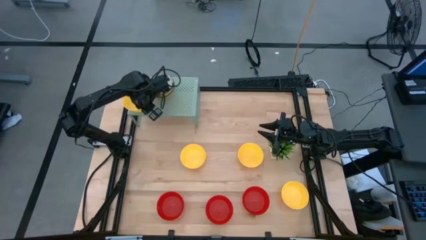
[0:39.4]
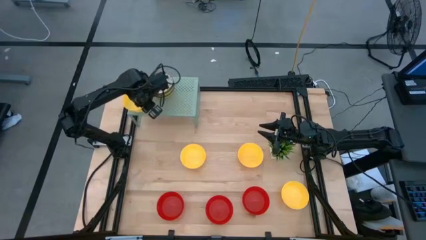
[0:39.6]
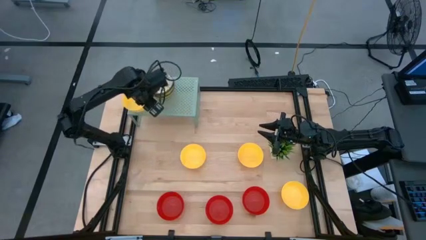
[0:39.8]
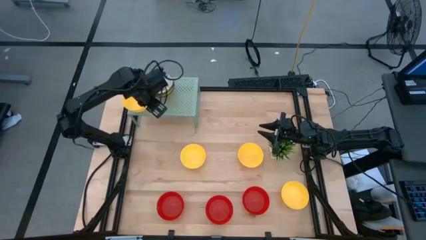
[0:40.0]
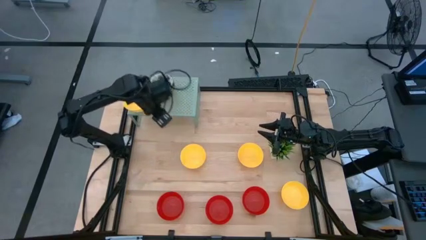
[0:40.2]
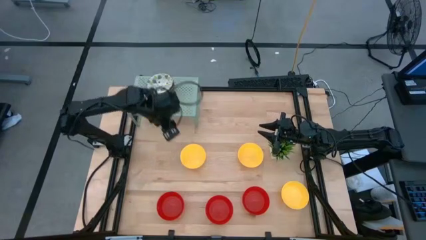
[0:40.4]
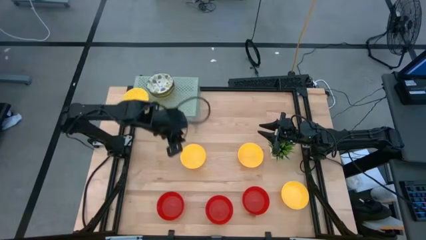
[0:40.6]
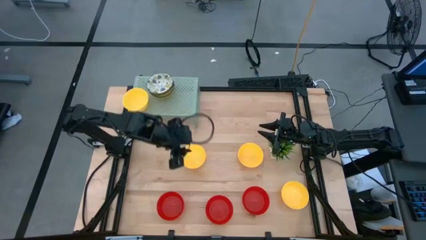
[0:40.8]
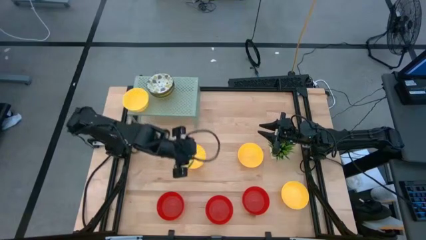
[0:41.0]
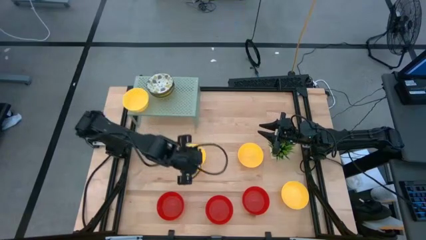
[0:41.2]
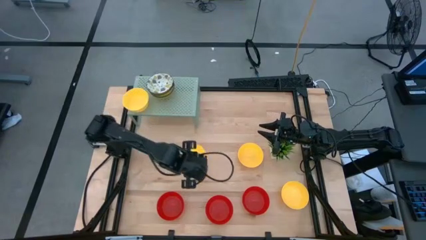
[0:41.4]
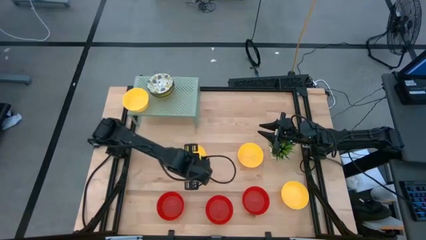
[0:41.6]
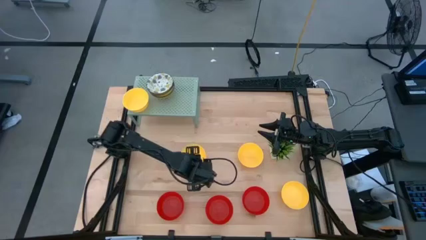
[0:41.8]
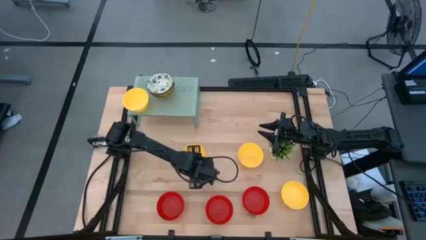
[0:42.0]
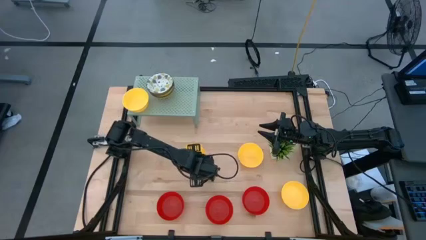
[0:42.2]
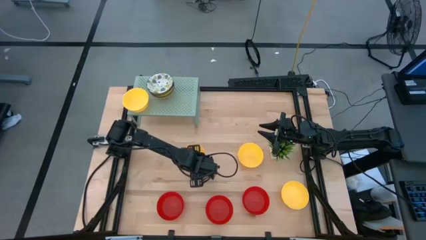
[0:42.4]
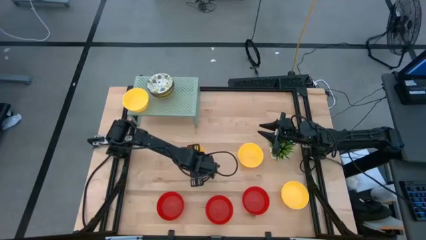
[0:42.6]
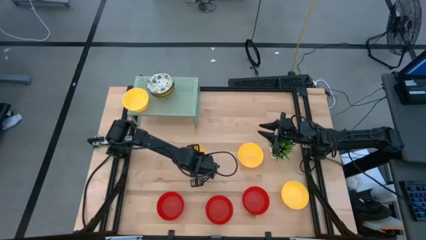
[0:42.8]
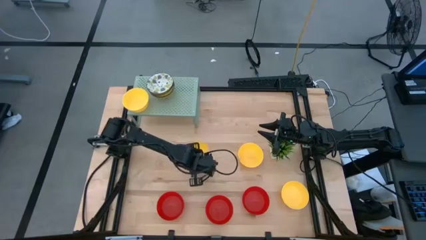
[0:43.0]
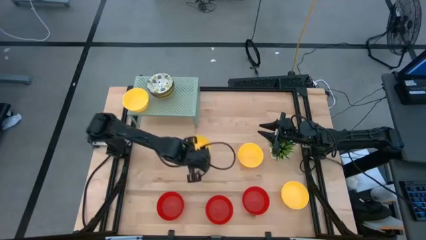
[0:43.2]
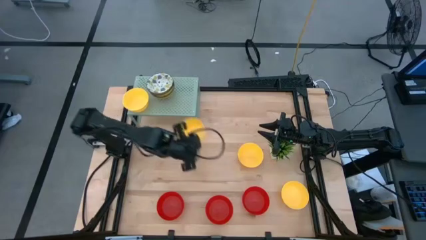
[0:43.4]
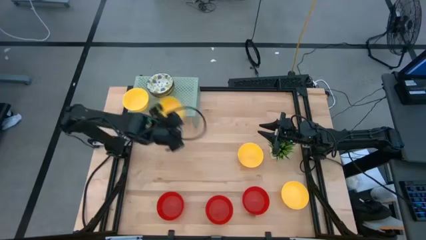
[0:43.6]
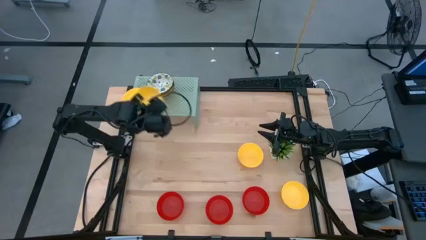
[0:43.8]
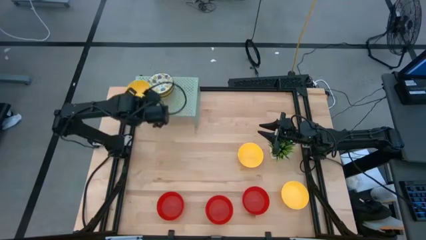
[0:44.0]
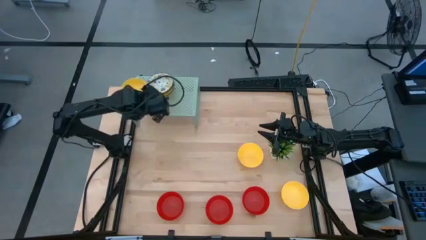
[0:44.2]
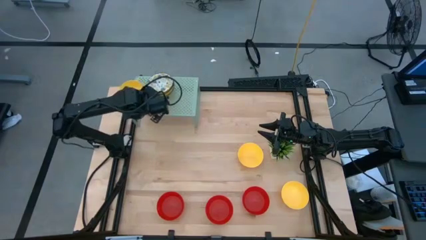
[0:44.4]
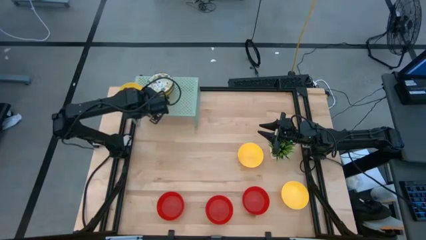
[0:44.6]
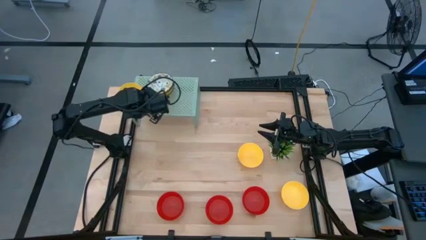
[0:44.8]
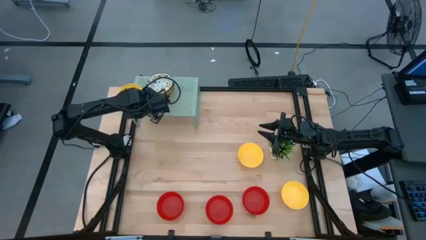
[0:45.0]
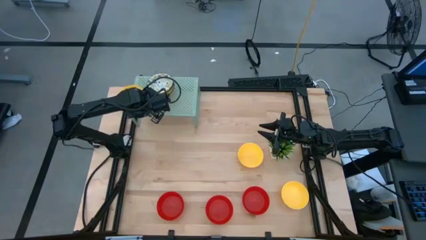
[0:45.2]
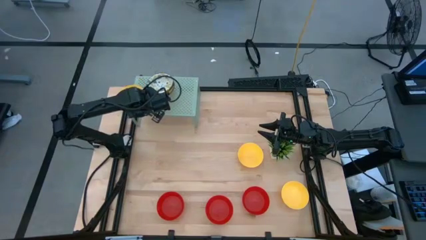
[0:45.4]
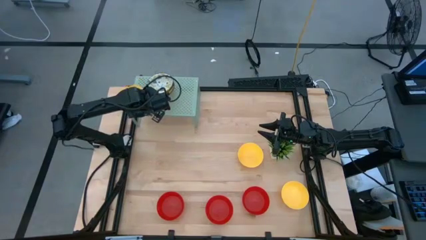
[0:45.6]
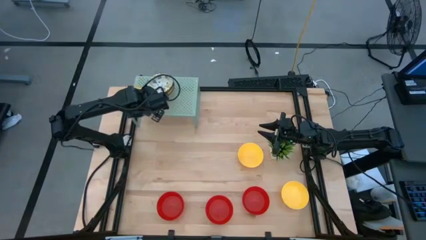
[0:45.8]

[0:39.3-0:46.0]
Task: Pick & Place Mini bowls
Stack the yellow bowl on the yellow bowl on the shelf

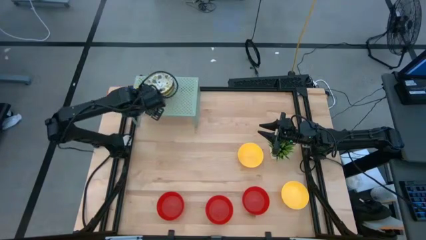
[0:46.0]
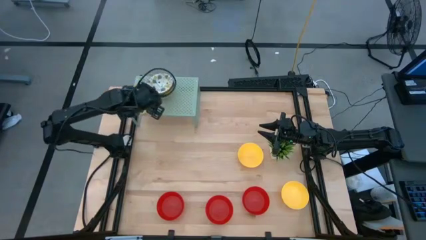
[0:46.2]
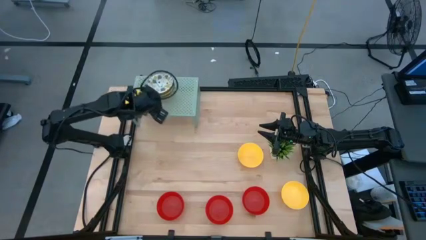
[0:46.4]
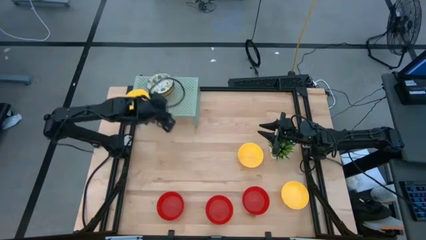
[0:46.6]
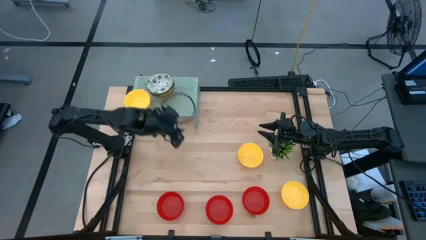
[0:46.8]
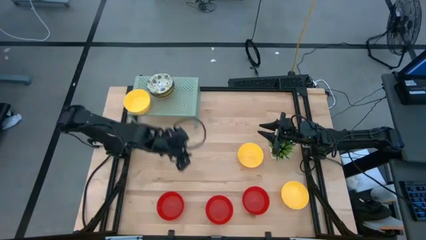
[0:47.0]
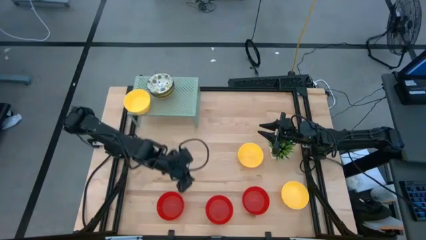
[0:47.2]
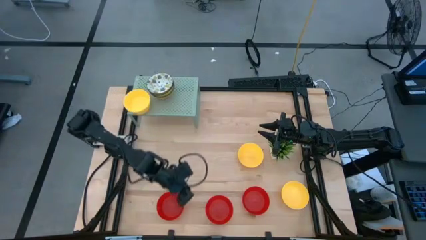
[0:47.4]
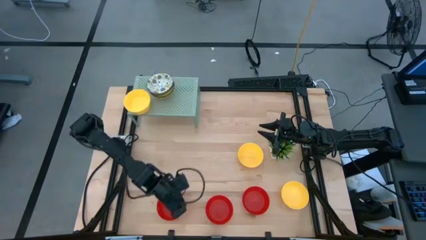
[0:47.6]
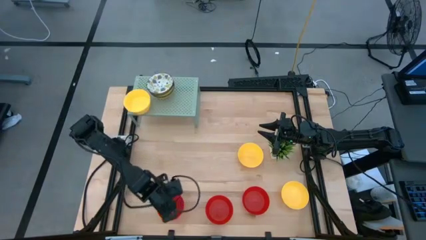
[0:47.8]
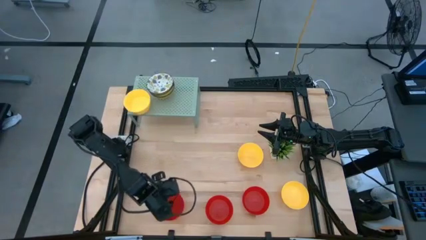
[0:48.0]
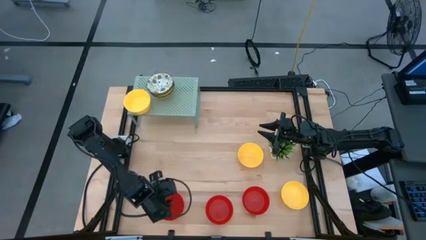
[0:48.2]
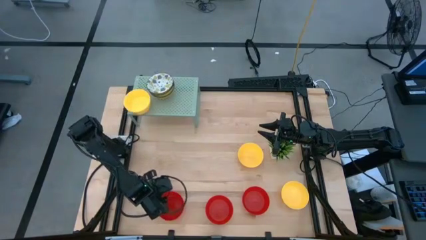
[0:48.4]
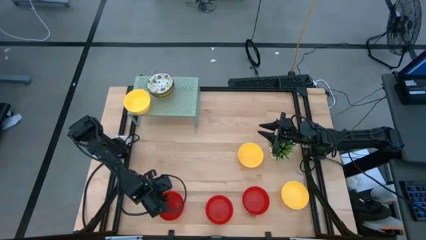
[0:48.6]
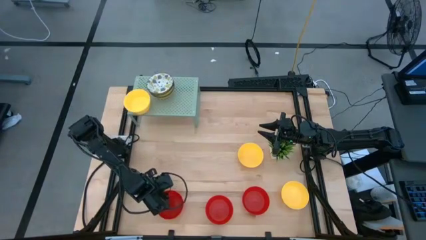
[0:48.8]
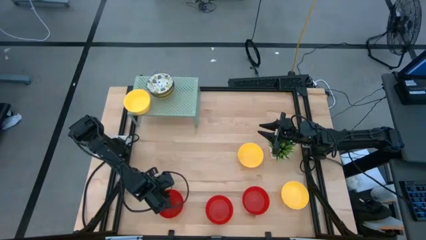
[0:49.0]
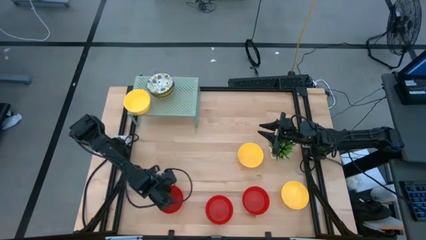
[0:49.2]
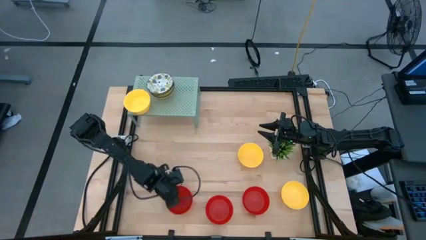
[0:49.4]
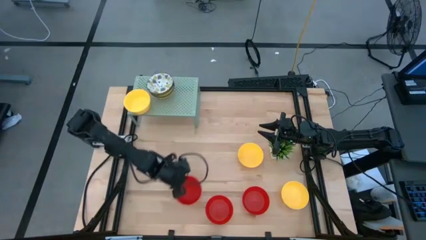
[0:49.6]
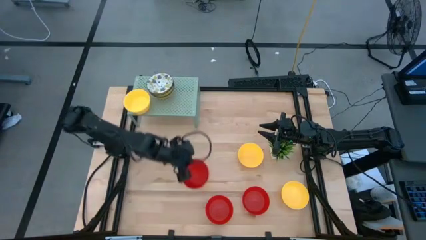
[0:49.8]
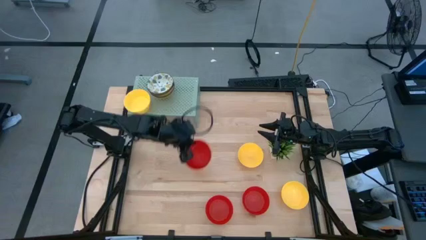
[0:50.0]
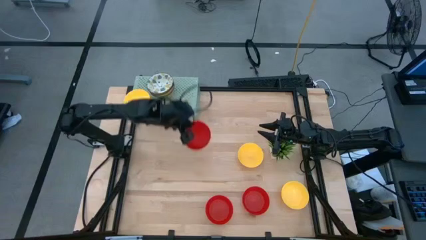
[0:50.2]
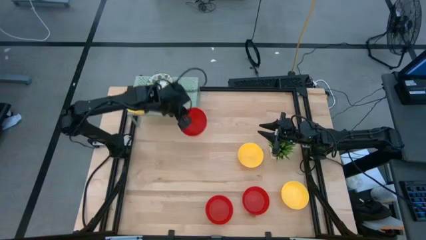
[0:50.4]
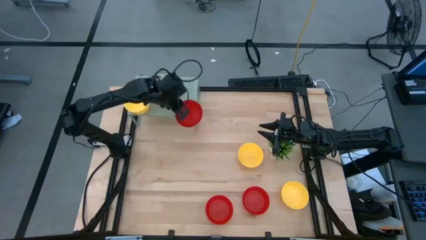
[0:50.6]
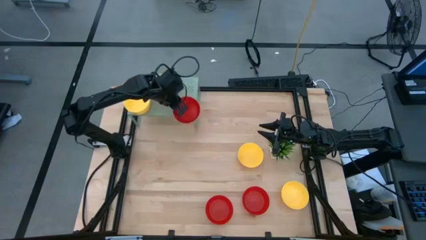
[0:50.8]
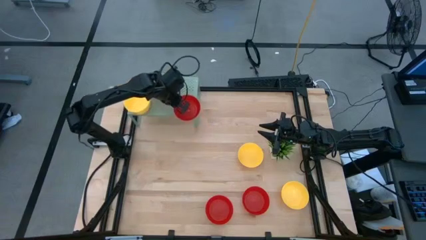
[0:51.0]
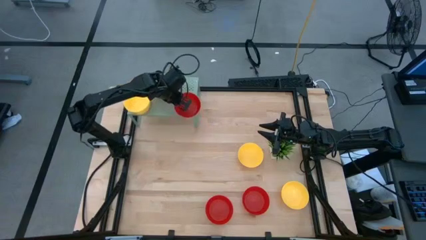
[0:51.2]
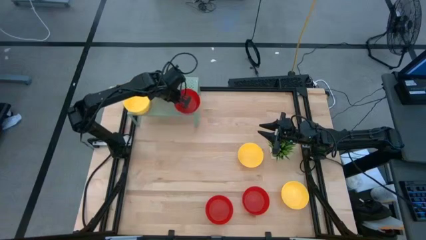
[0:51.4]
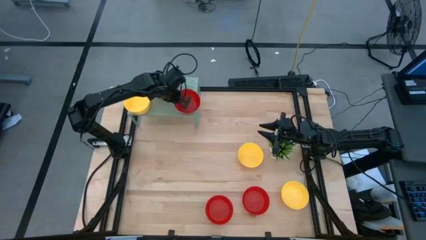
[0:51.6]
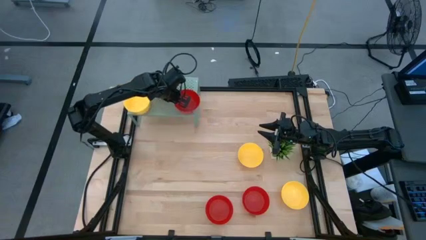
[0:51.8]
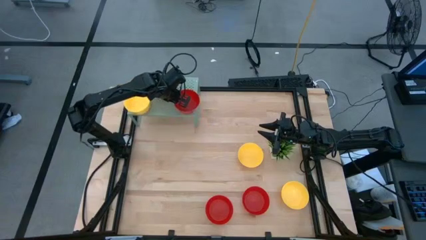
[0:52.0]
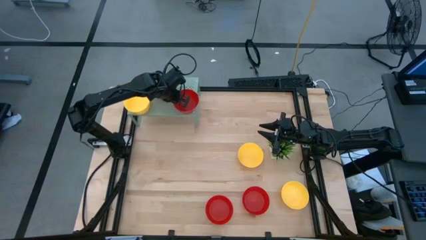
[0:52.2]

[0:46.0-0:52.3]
Put the red bowl on the shelf

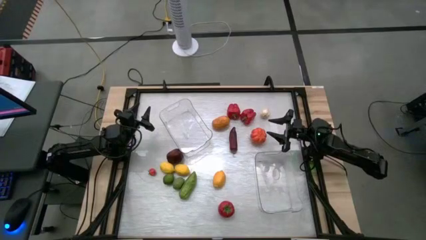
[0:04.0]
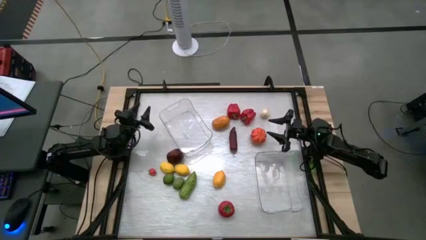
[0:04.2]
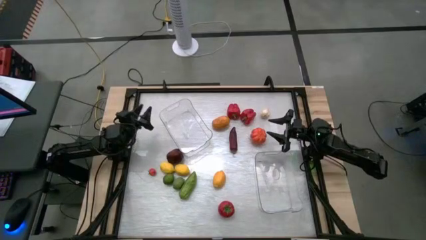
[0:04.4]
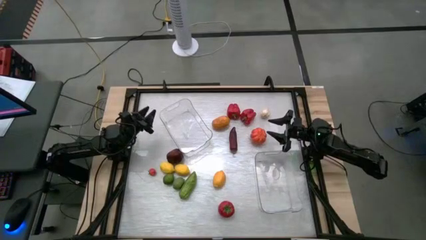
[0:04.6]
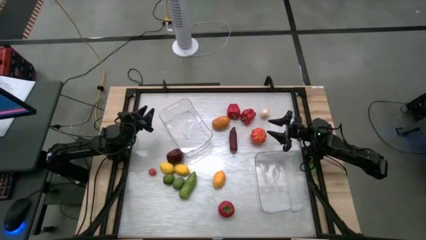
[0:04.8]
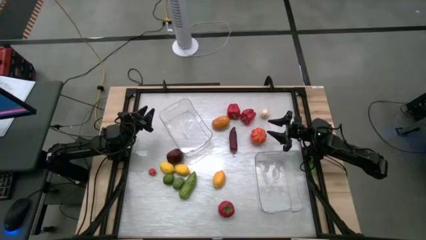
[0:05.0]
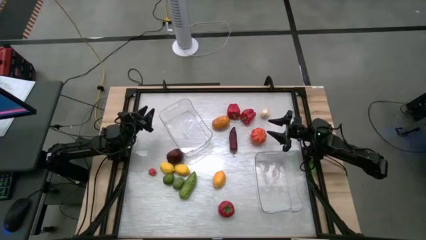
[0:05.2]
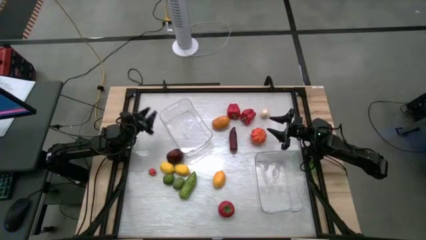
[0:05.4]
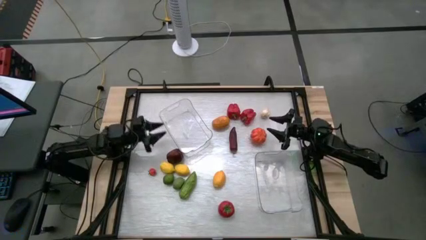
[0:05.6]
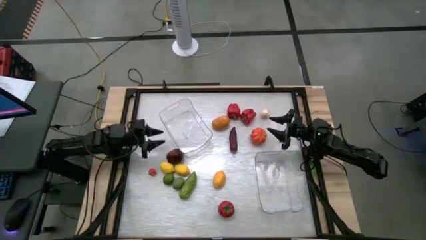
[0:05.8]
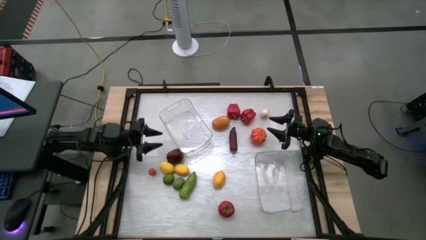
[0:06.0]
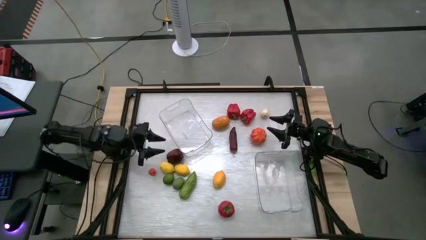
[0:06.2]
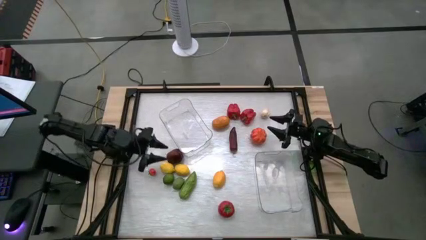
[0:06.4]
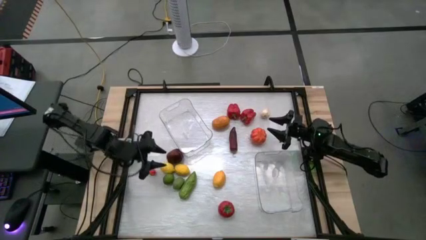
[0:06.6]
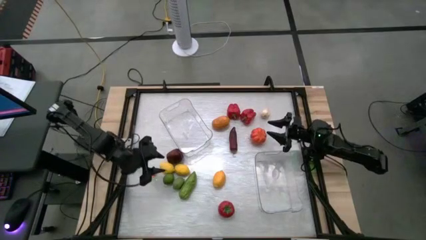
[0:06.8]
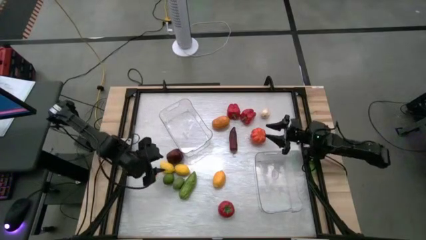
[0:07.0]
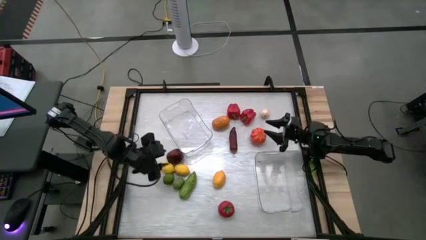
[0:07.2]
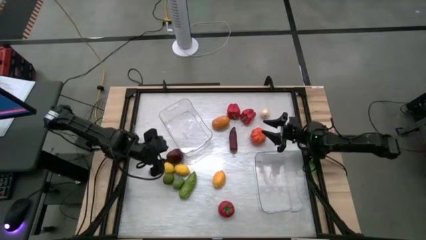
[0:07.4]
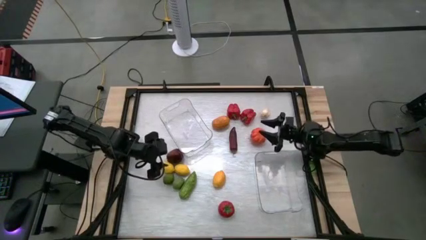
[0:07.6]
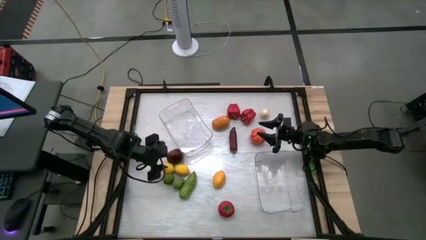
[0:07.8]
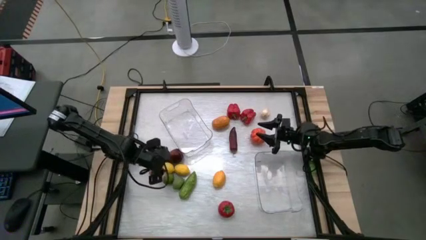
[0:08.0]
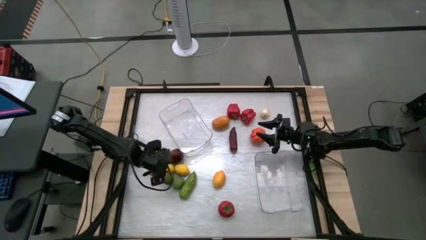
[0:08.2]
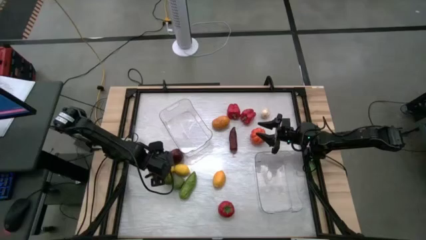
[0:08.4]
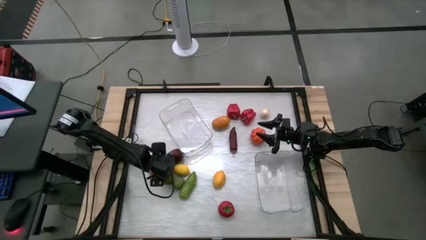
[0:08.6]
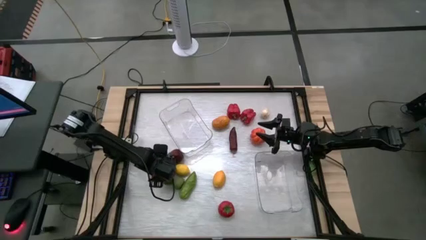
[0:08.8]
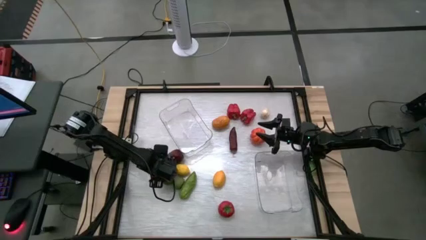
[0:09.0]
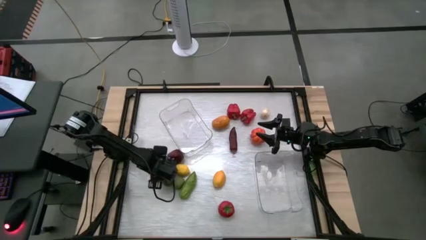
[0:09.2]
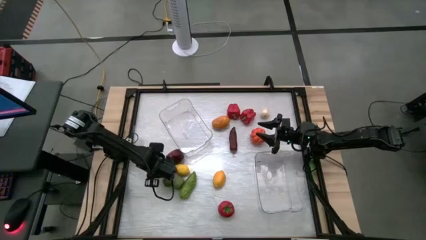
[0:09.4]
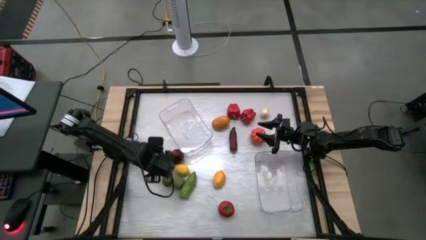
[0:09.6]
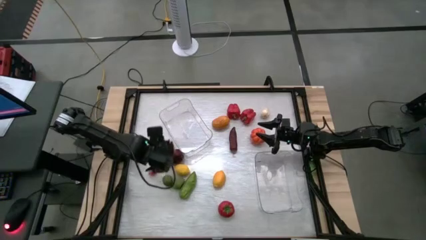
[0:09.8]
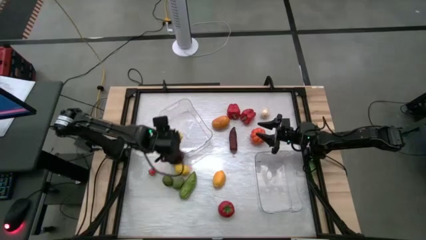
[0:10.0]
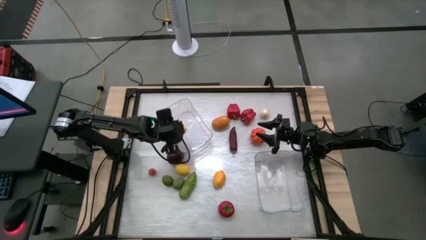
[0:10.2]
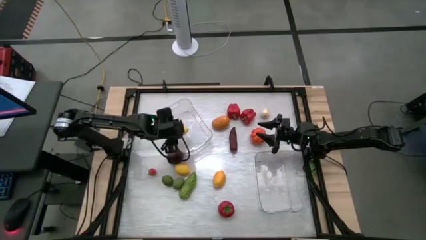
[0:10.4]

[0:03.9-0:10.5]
Task: Sort produce into baskets
Put the top left yellow lemon into the top transparent bin
